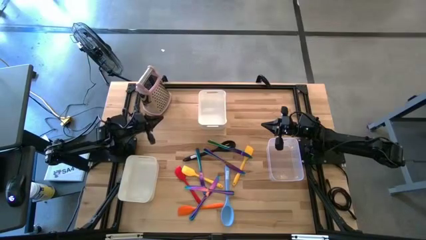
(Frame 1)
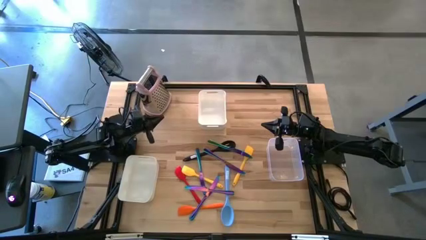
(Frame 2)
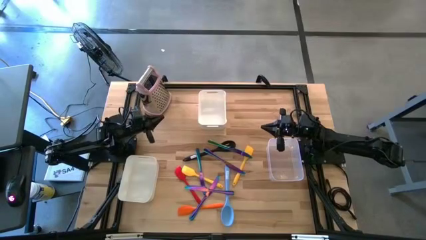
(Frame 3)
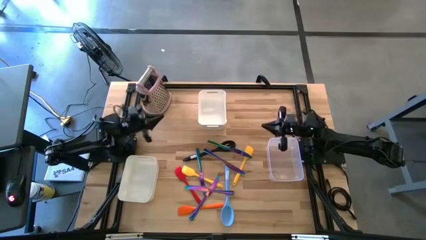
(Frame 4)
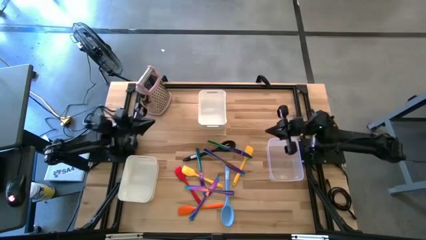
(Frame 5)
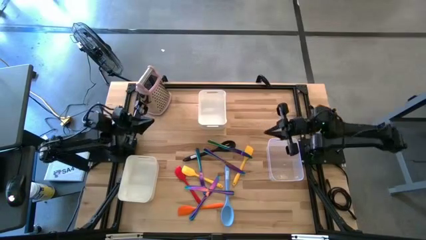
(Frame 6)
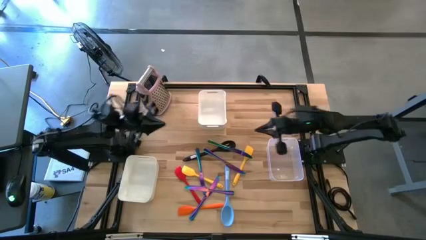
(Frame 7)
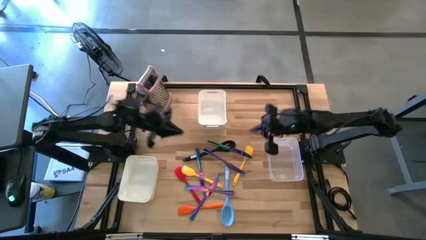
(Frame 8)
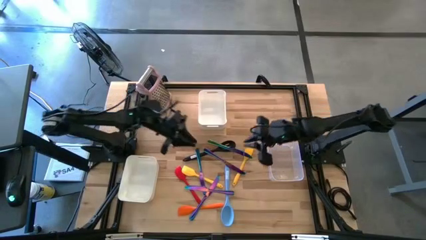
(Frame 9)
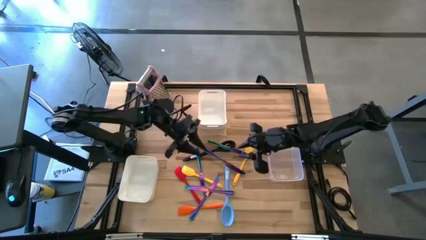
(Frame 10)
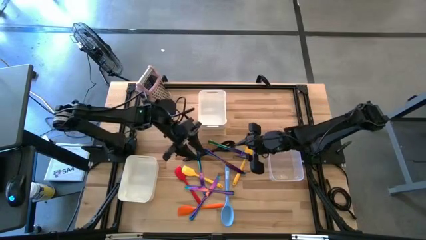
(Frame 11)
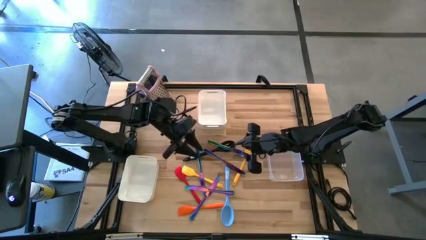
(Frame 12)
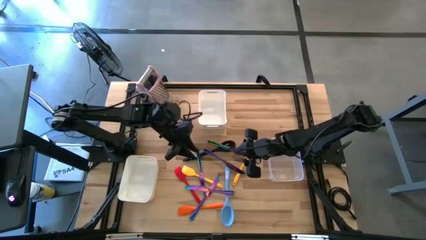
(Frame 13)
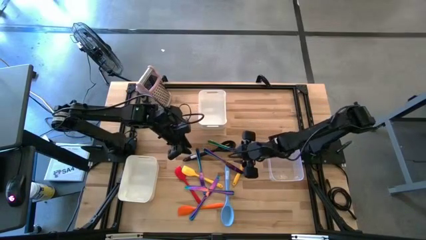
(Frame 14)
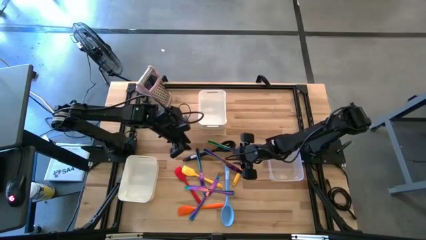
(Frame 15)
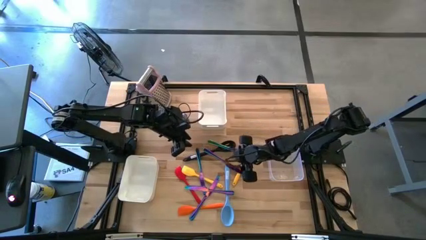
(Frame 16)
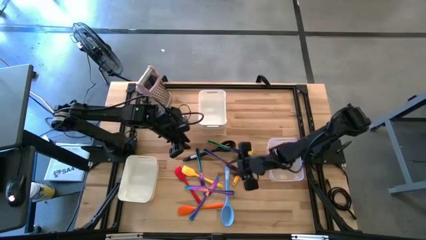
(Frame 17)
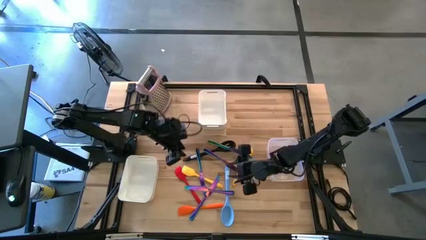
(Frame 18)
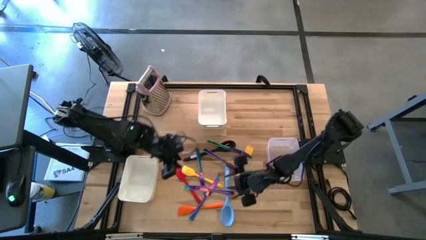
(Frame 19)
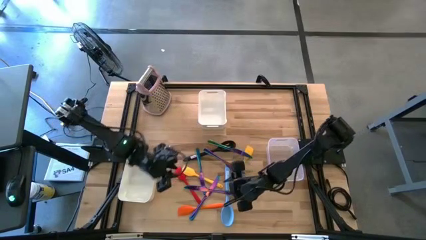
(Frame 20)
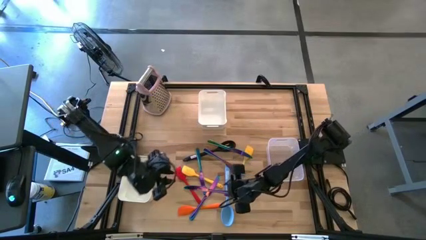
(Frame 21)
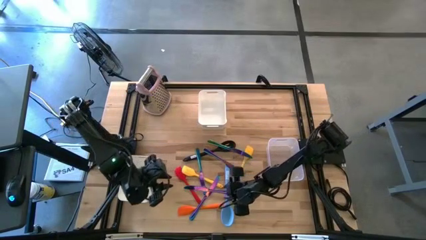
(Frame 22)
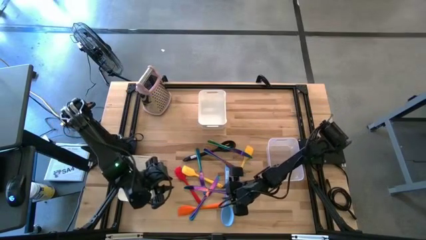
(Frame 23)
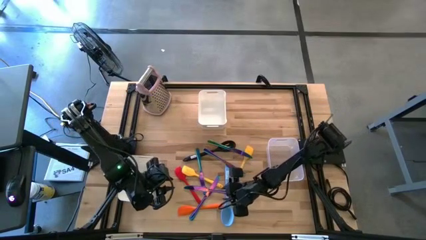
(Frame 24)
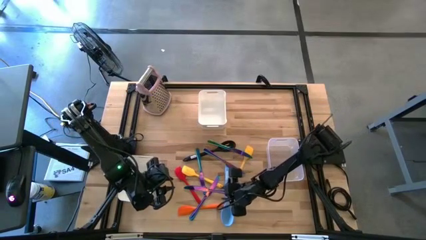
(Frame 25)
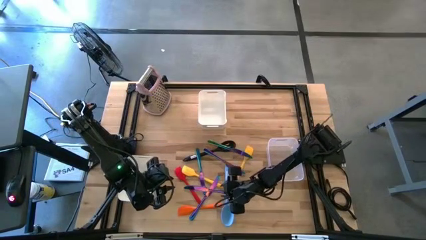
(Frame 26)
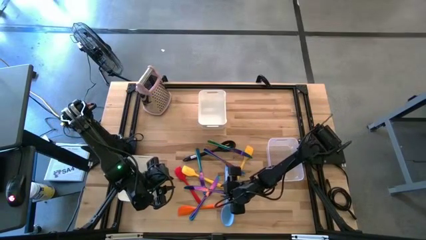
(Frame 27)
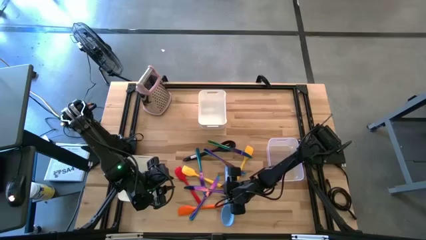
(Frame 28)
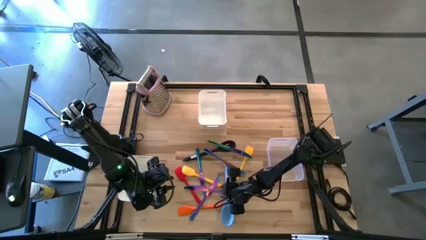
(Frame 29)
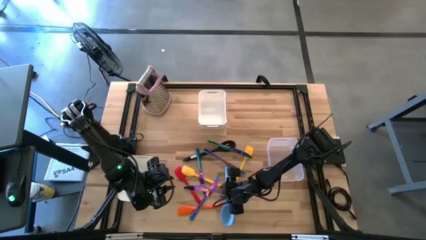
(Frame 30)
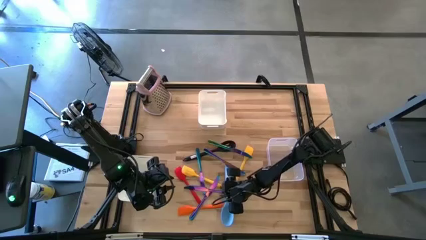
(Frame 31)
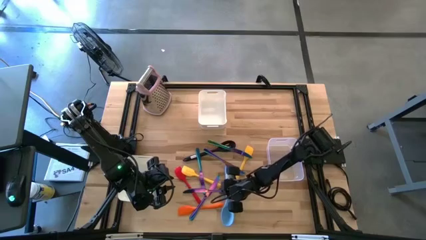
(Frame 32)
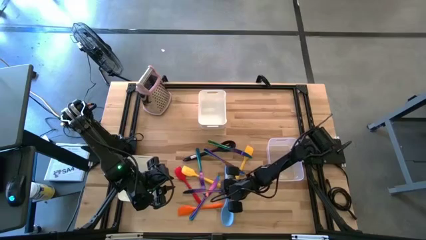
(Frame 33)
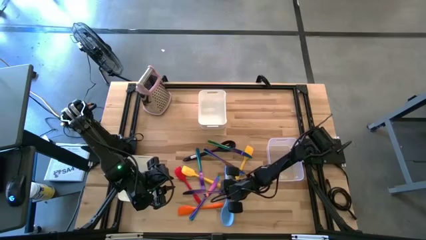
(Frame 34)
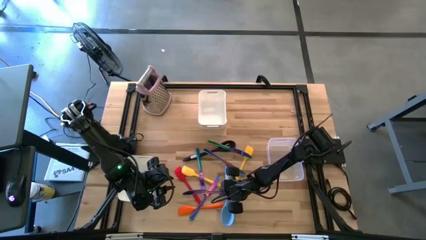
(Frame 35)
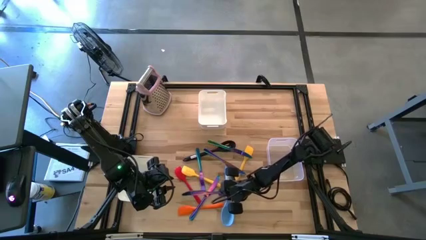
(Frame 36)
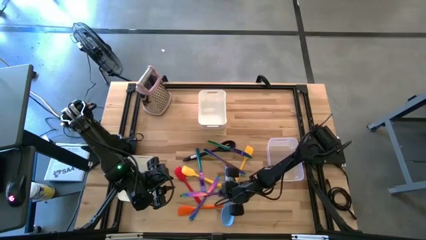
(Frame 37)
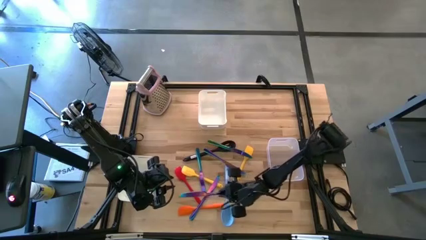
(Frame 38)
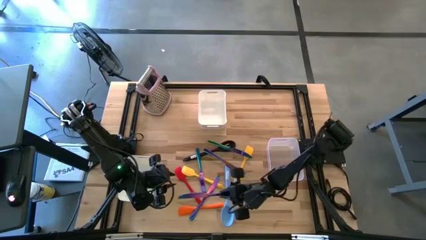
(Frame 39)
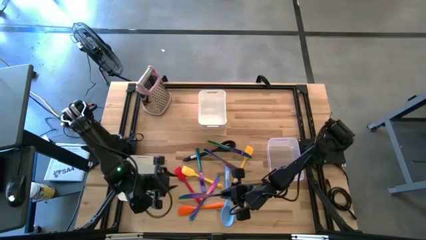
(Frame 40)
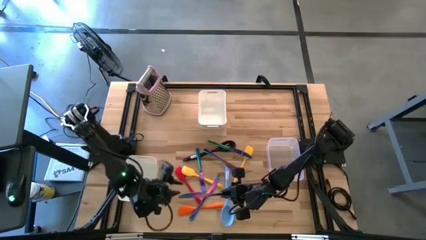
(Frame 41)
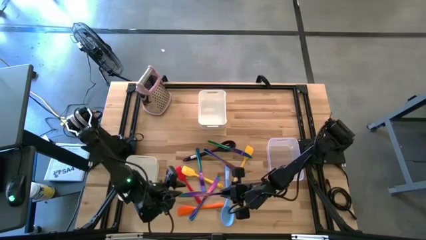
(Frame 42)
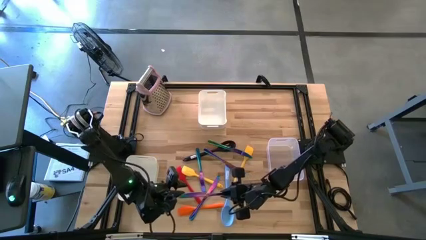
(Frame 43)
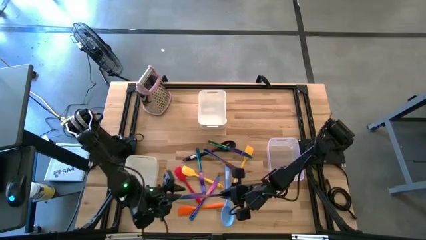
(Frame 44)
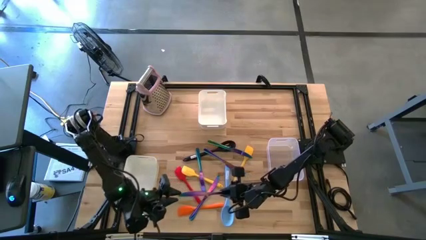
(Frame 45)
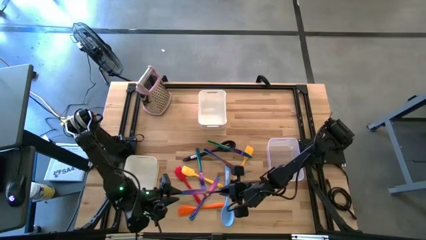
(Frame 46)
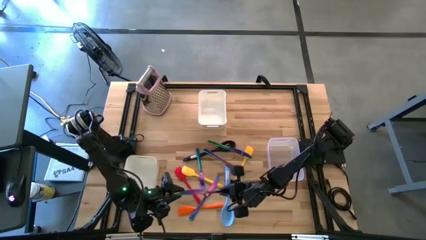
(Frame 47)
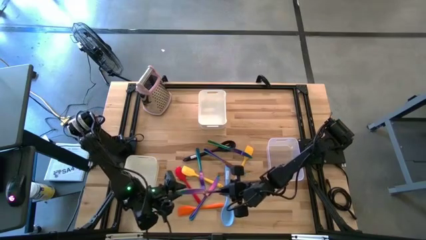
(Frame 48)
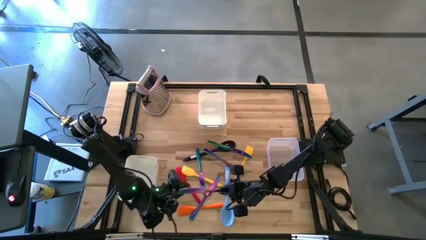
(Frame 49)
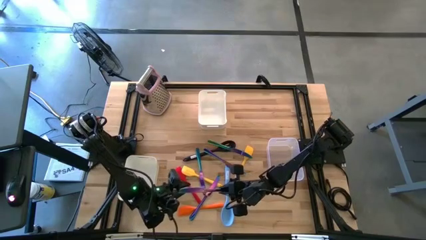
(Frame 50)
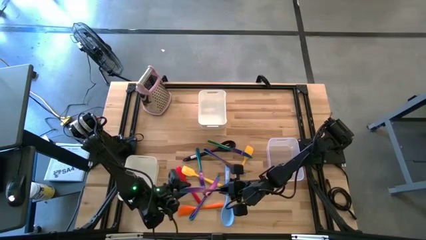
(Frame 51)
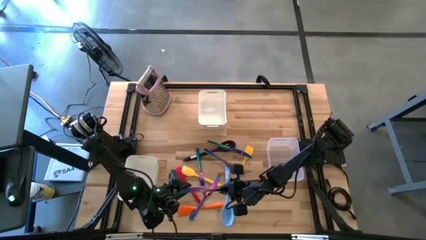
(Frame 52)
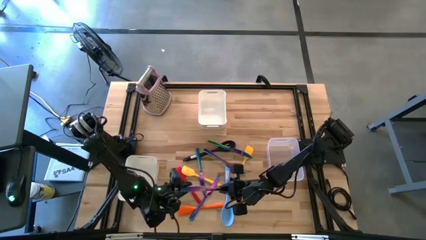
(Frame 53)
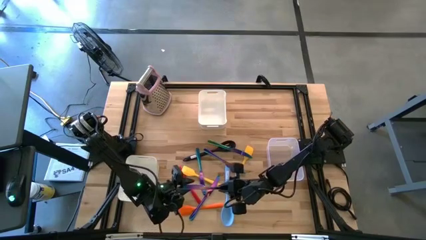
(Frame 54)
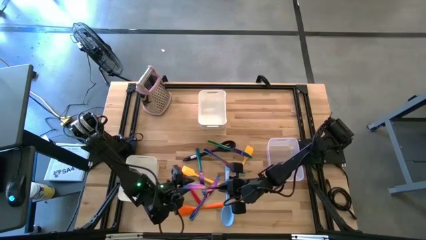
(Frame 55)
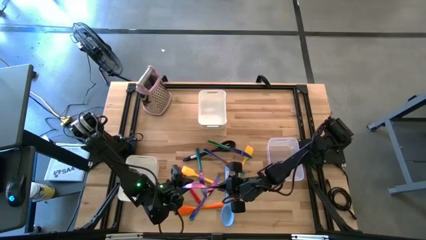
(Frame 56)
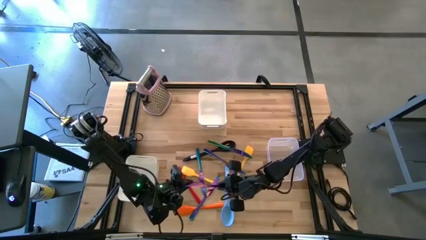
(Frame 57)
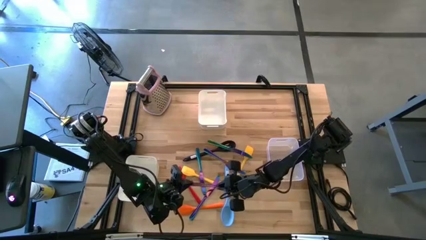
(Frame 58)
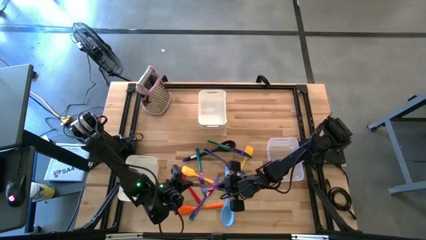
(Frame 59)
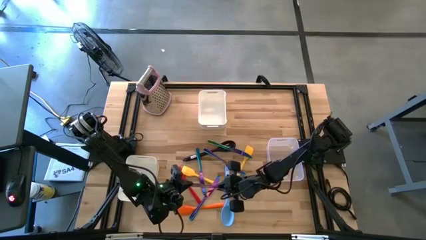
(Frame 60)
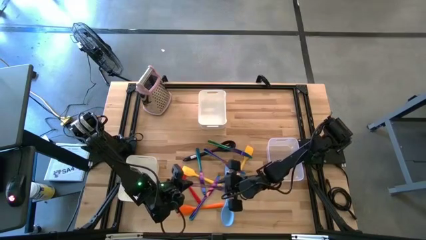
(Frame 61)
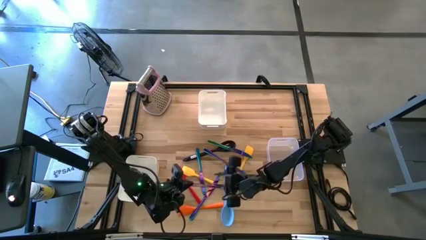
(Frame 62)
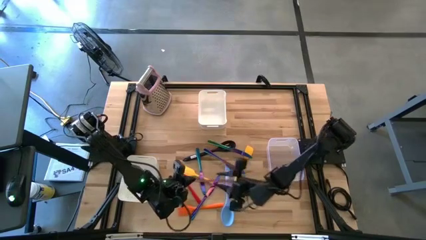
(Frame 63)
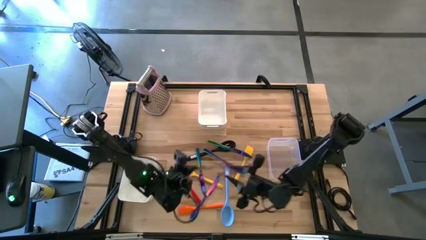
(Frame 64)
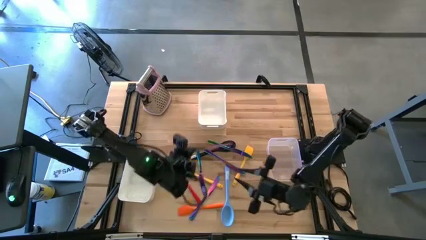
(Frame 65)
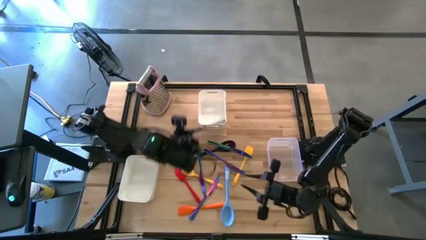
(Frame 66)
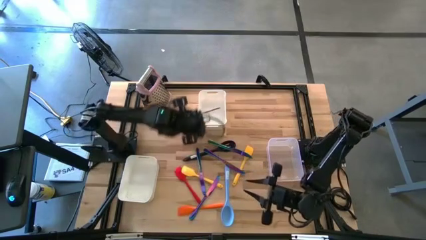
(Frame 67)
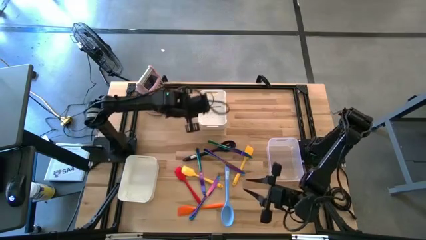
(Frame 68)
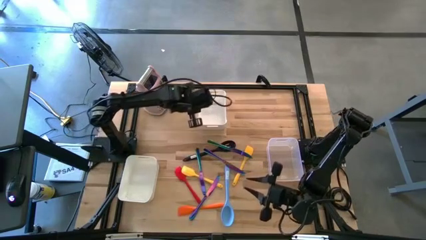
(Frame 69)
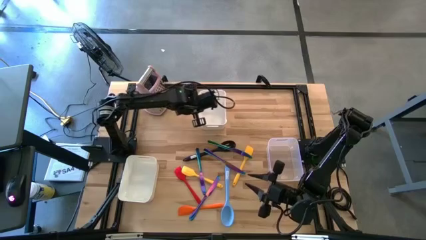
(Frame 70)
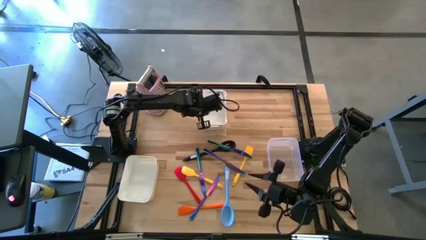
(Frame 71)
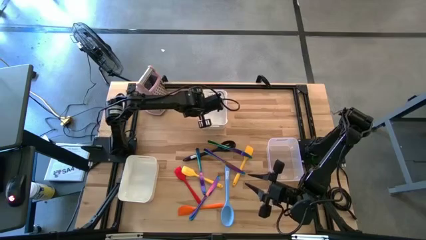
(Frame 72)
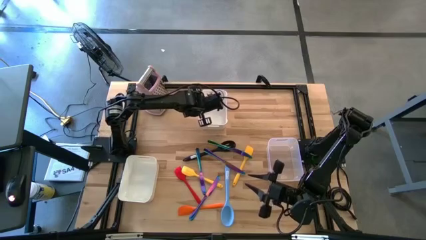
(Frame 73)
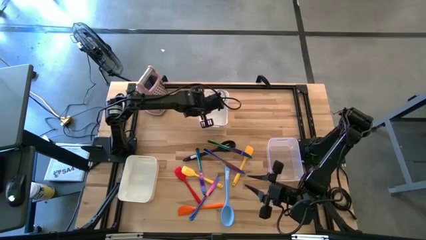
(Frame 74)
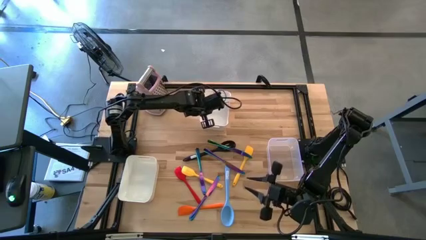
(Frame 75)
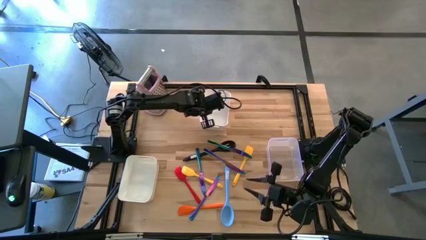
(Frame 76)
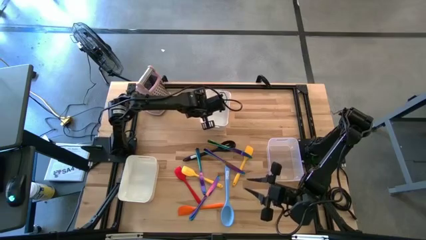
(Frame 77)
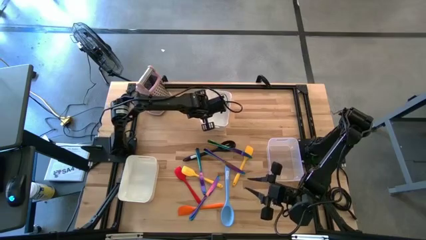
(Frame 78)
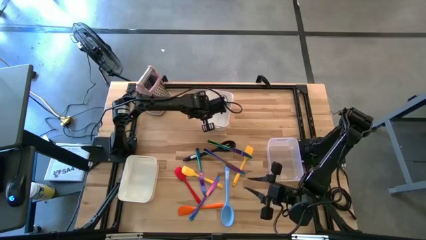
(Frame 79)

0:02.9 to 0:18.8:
Task: Pick & Place Kitchen Items
Put the blue table knife into the top white bin
